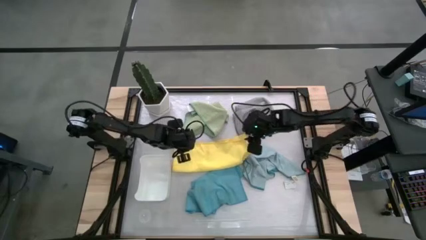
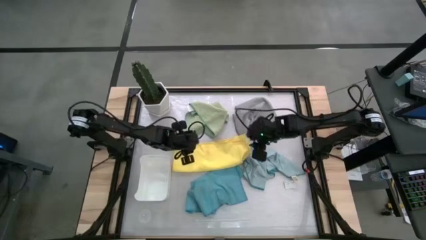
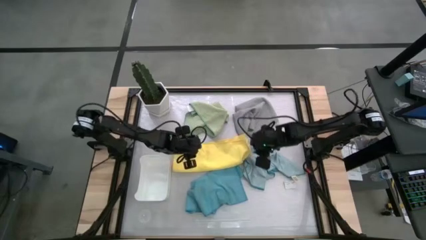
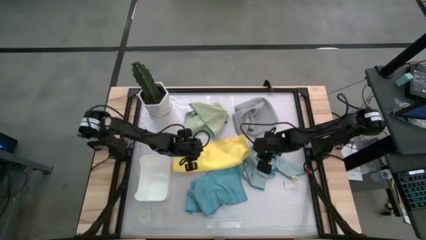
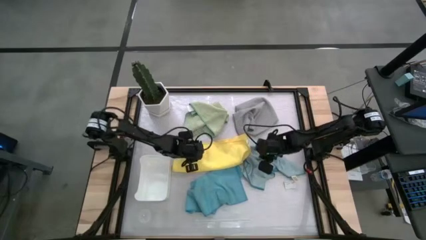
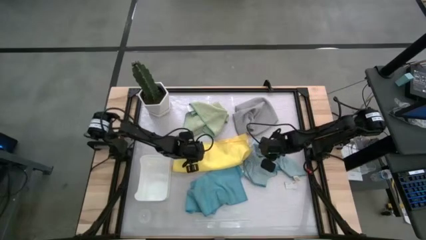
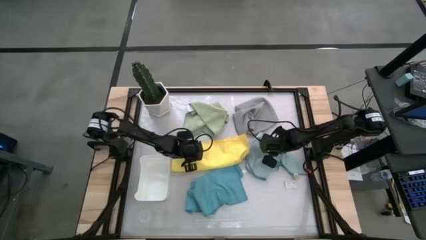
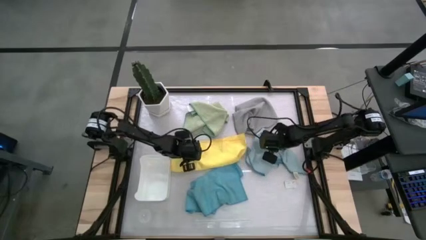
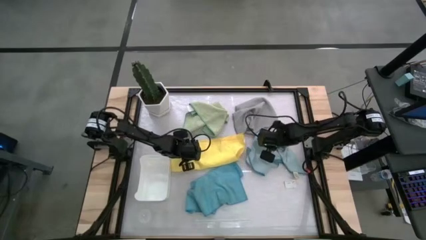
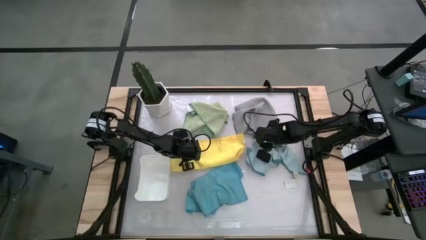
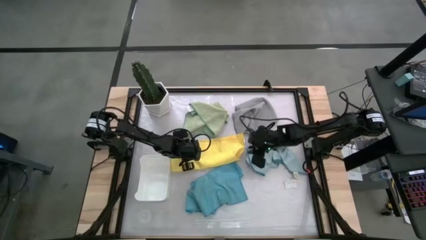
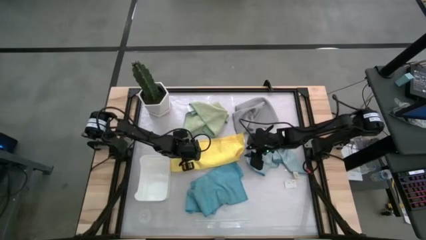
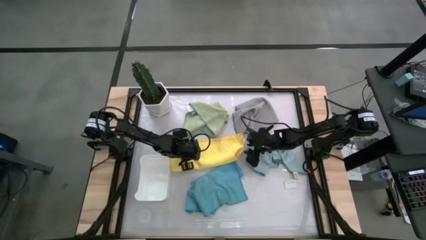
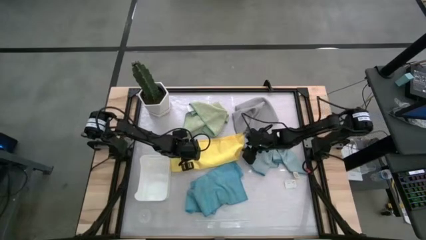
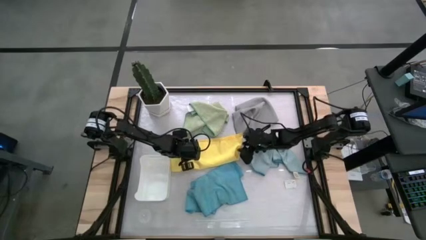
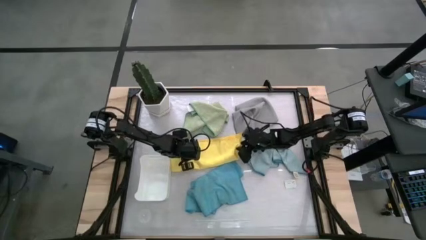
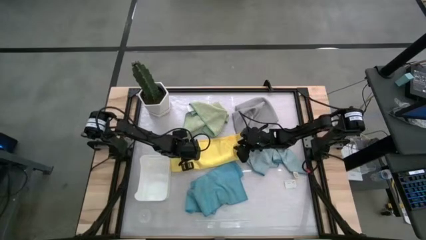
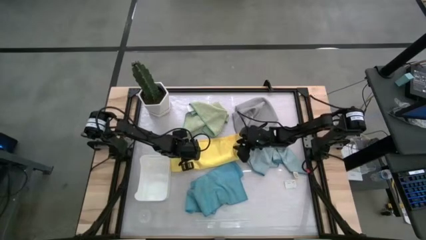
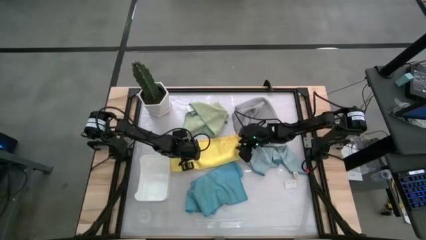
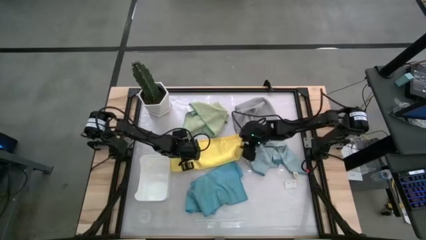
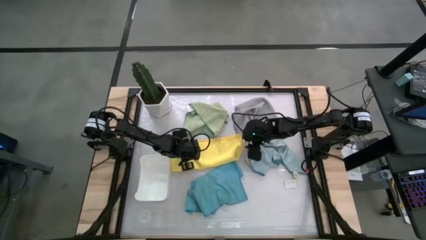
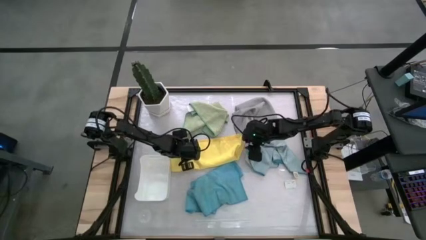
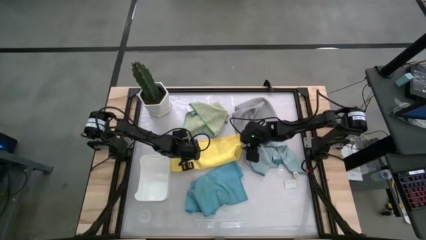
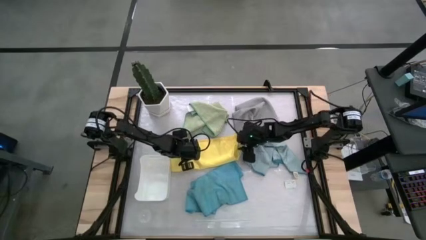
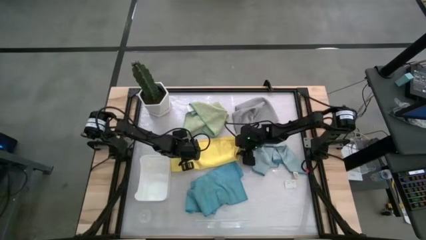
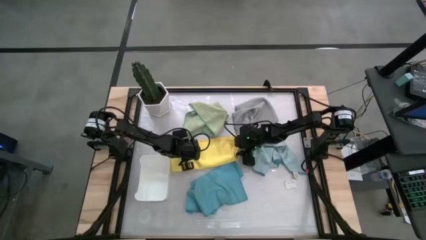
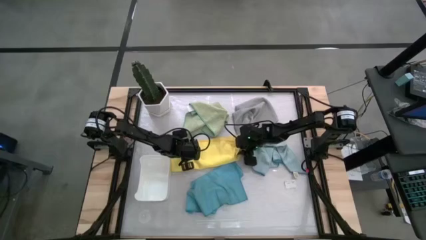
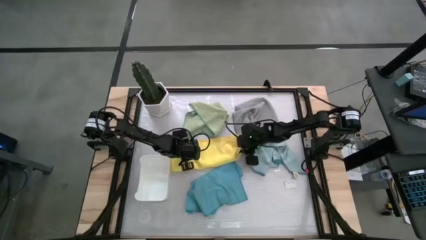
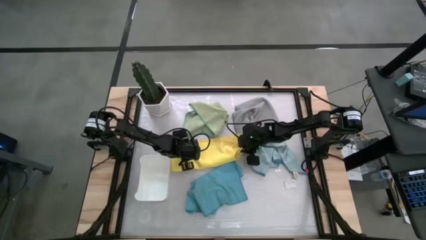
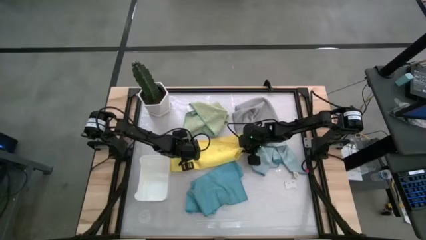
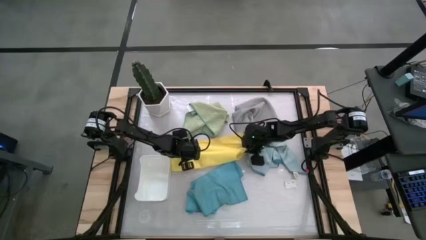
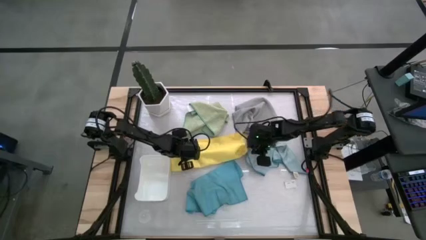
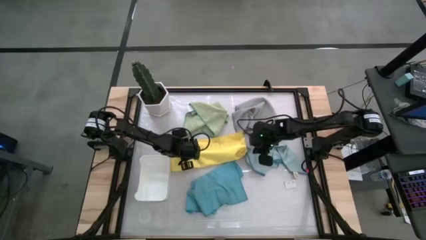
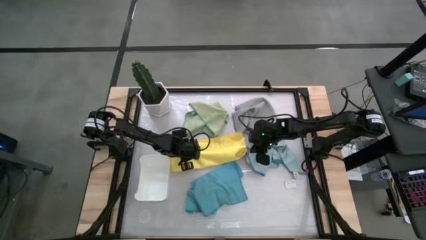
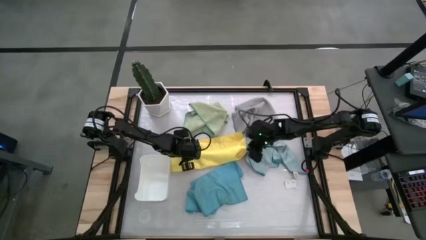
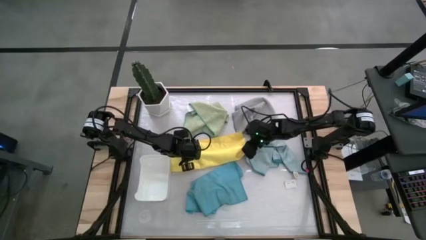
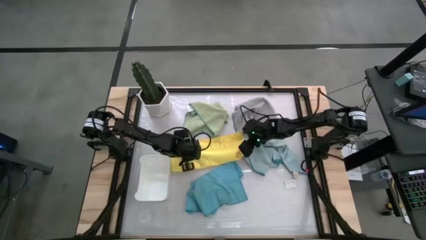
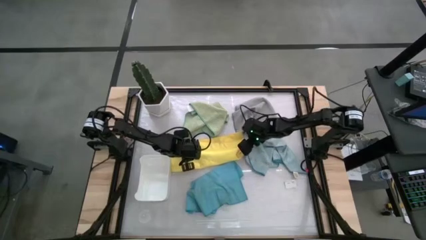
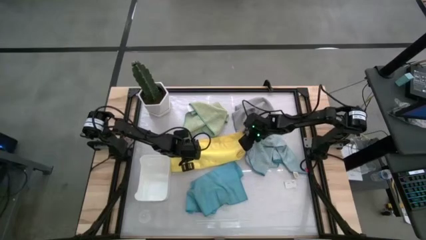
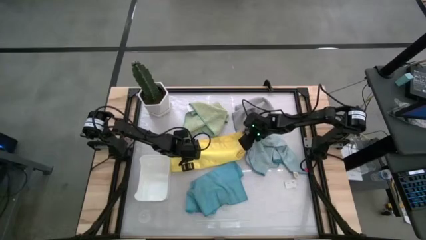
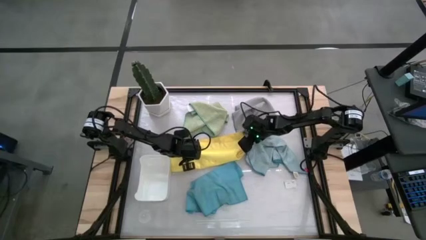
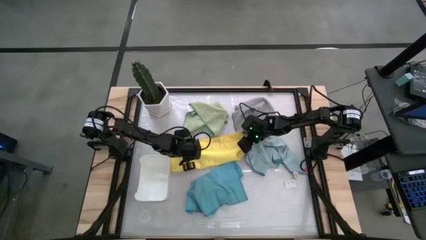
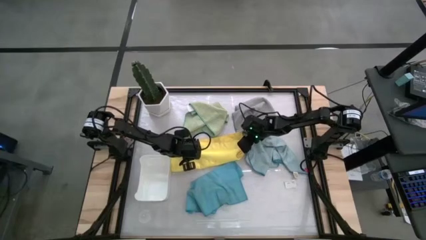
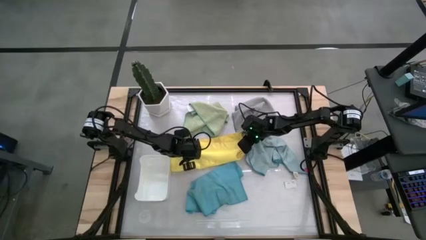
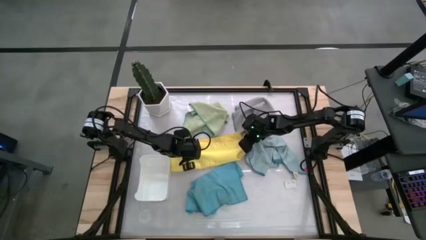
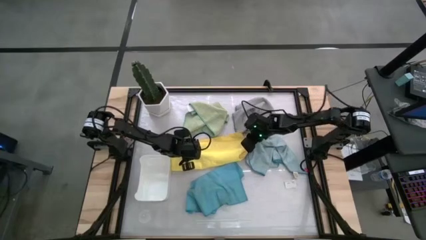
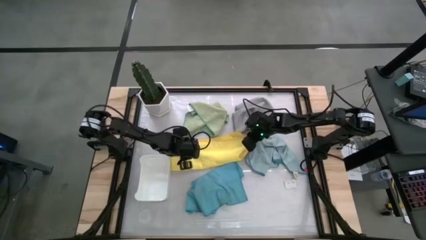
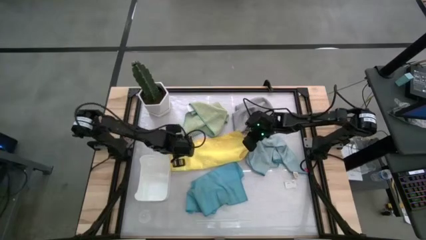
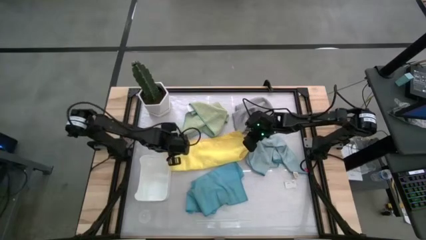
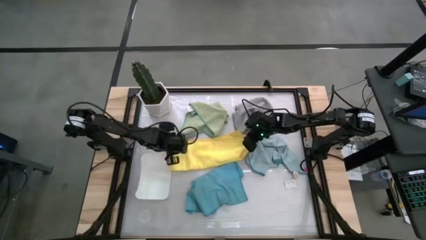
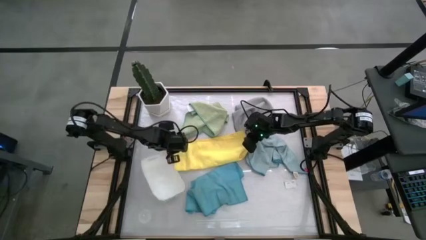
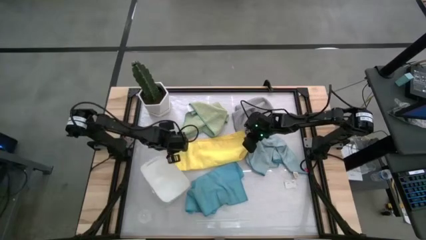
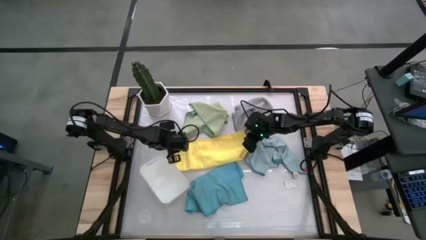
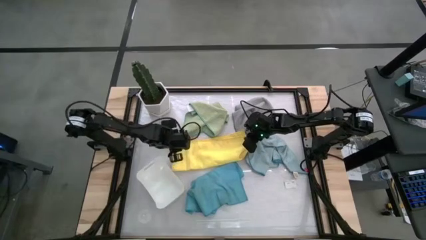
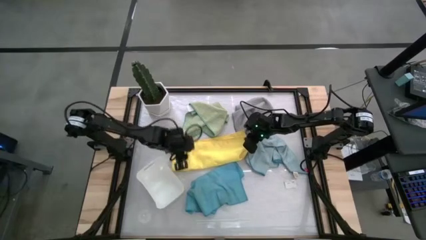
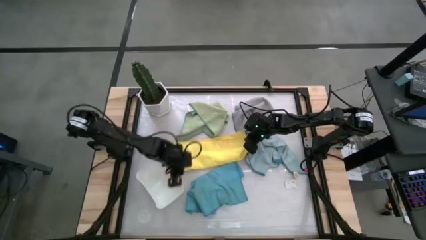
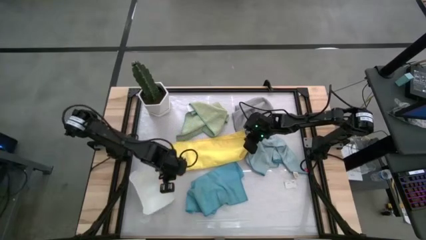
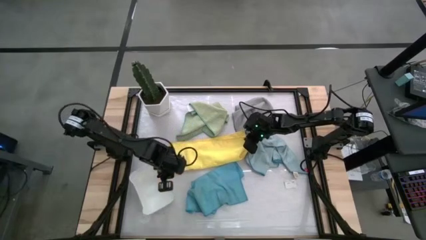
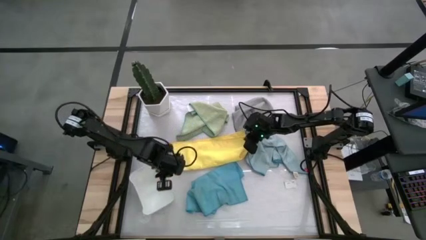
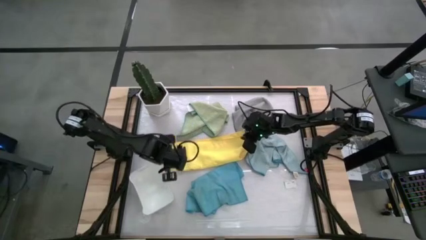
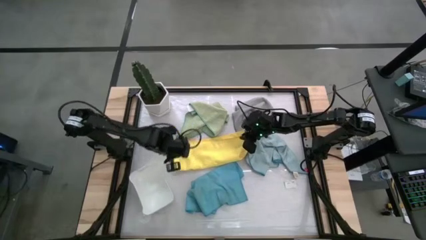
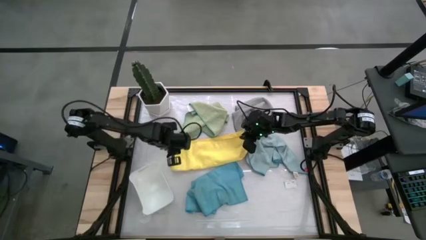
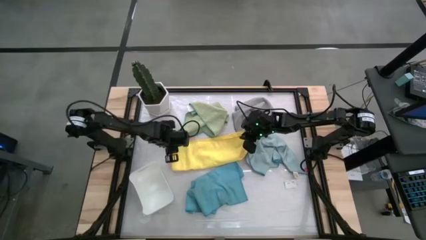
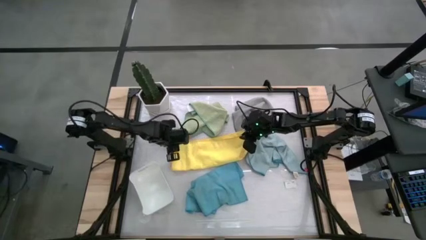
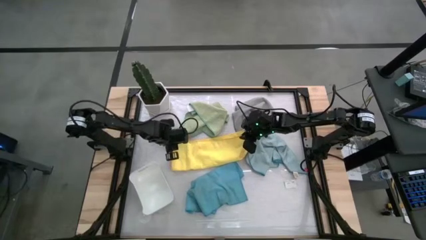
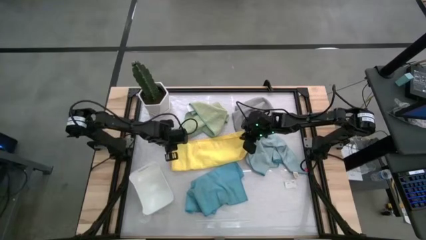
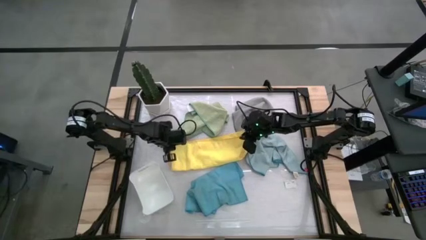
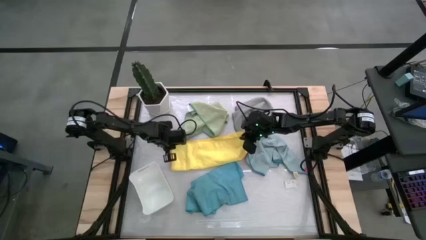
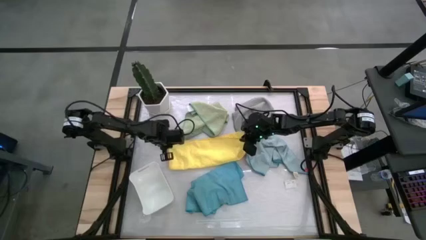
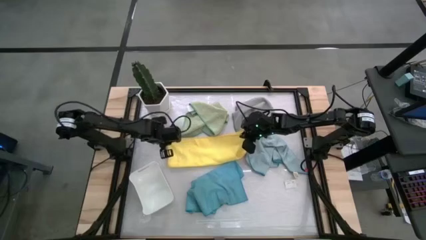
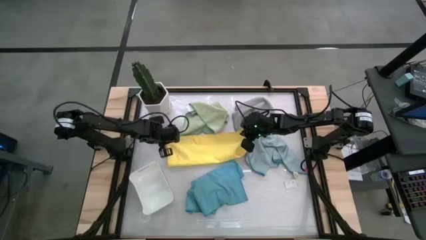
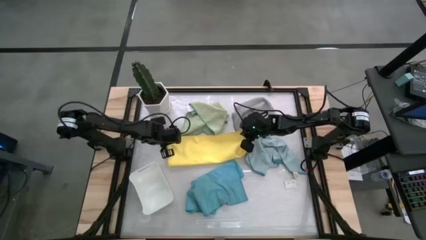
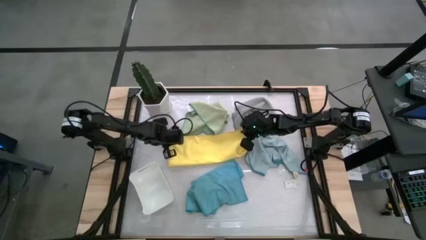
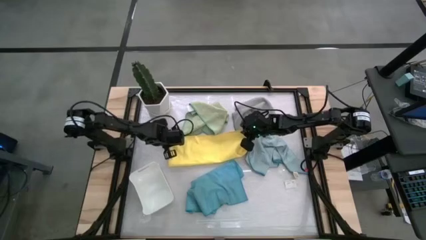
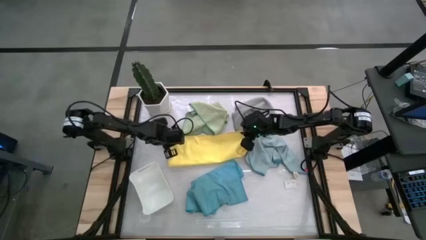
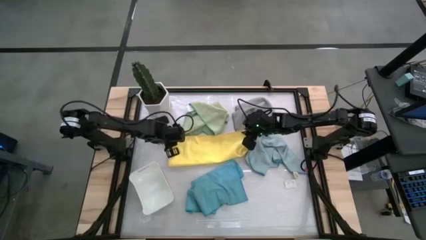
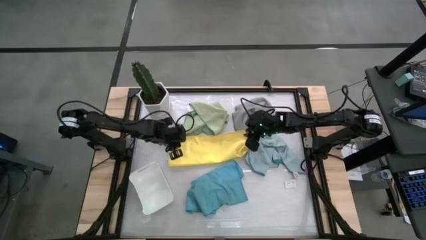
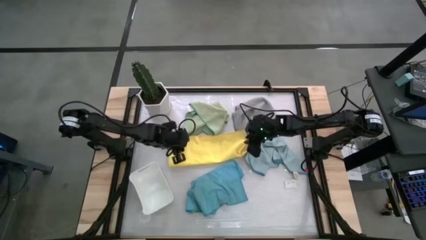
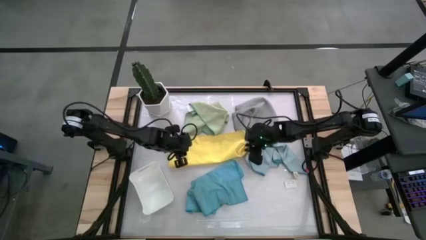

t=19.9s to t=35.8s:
Task: Fold microfiber towels
Fold the yellow microfiber towel
